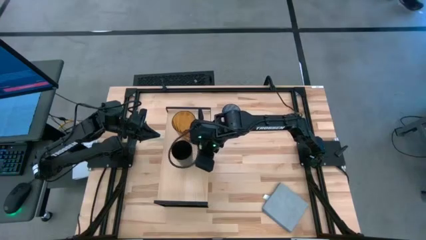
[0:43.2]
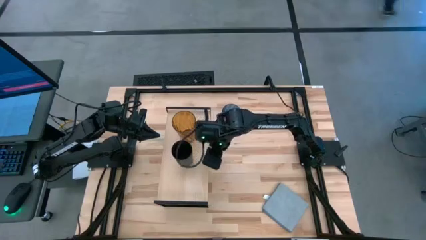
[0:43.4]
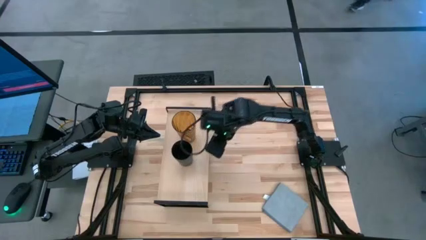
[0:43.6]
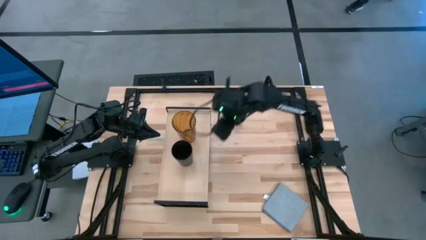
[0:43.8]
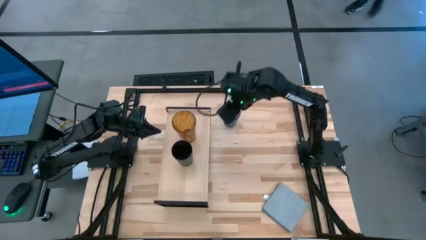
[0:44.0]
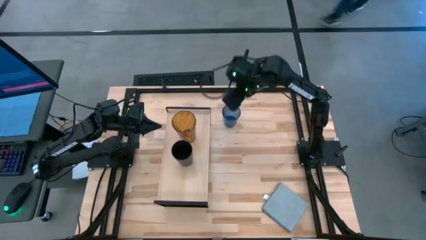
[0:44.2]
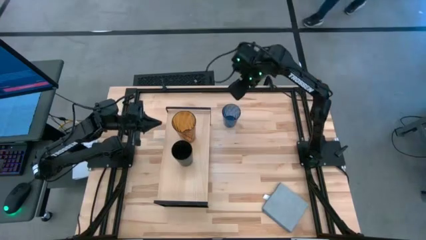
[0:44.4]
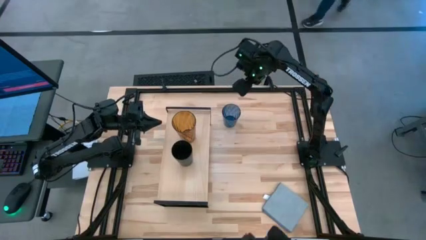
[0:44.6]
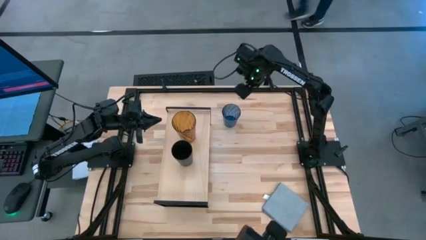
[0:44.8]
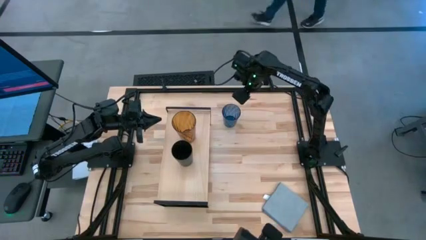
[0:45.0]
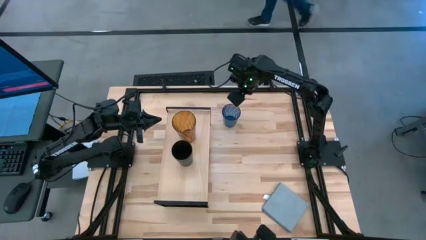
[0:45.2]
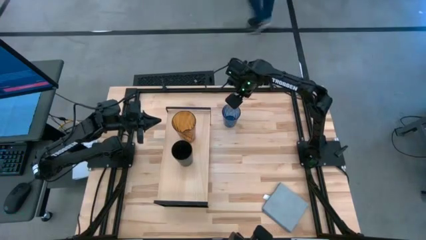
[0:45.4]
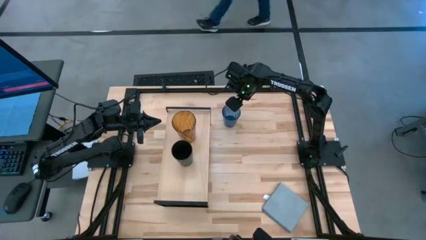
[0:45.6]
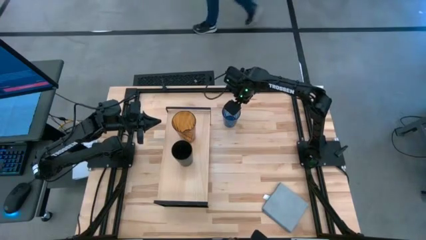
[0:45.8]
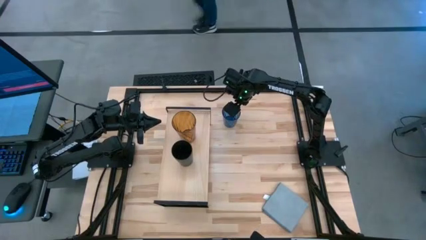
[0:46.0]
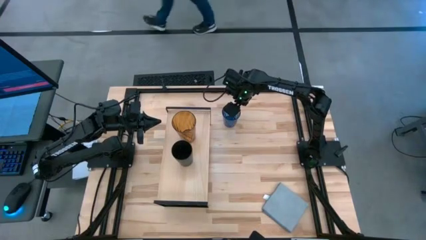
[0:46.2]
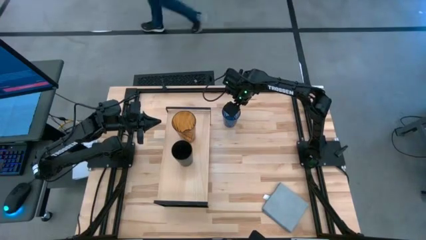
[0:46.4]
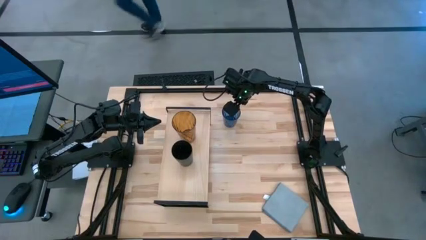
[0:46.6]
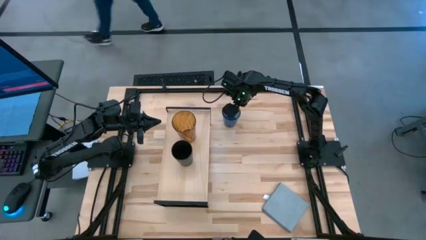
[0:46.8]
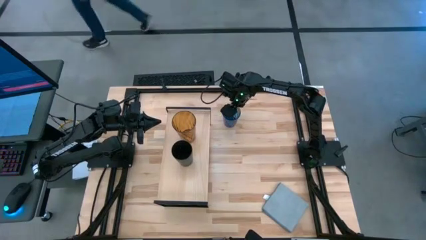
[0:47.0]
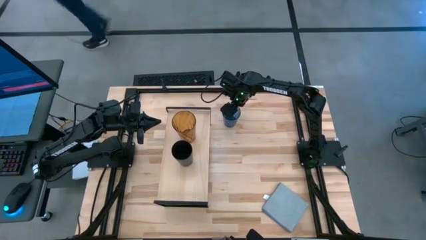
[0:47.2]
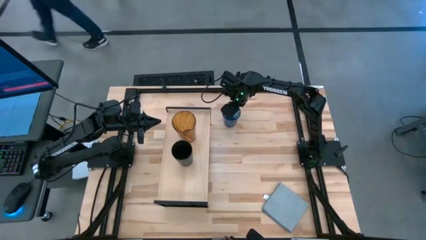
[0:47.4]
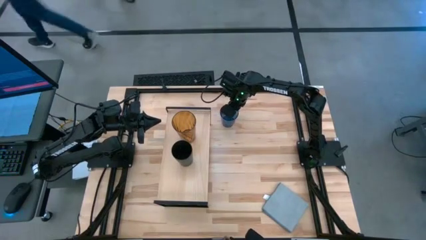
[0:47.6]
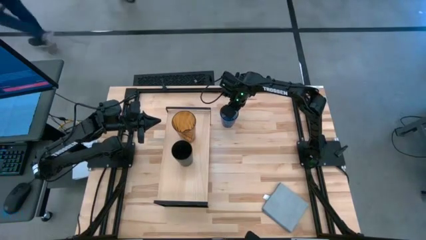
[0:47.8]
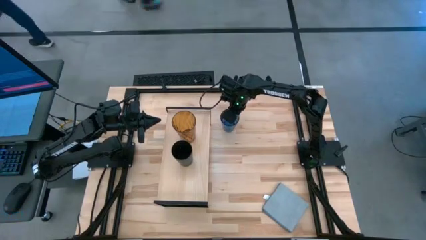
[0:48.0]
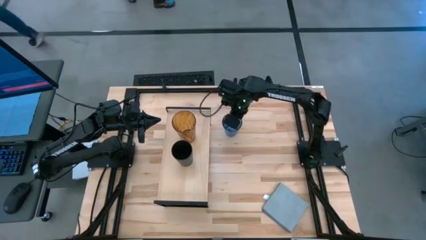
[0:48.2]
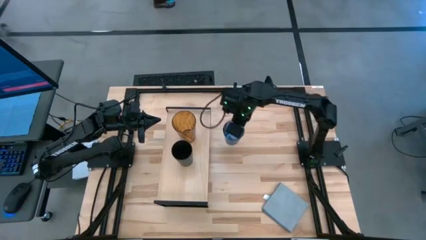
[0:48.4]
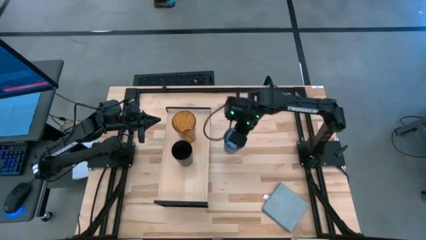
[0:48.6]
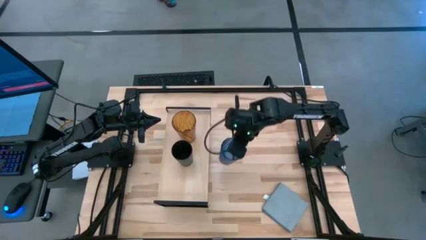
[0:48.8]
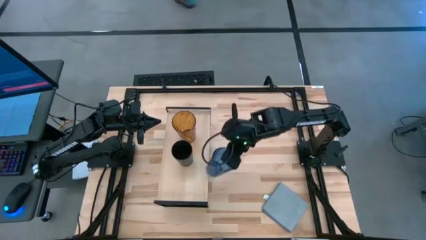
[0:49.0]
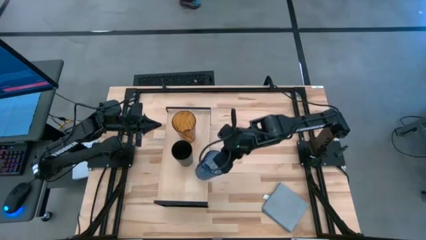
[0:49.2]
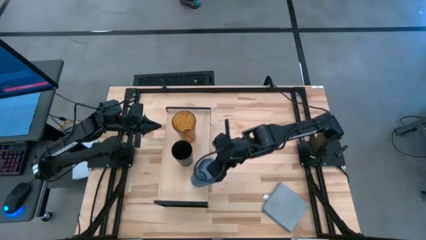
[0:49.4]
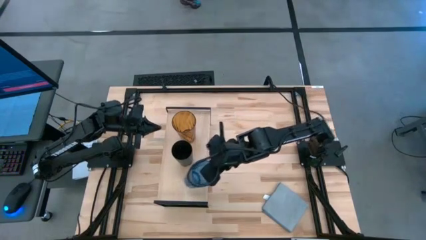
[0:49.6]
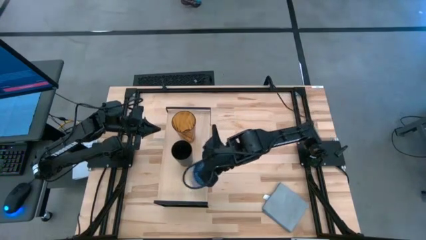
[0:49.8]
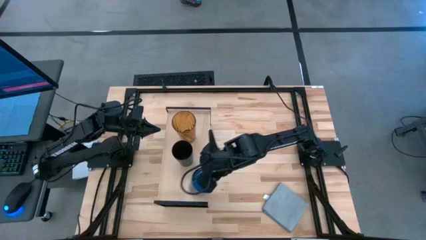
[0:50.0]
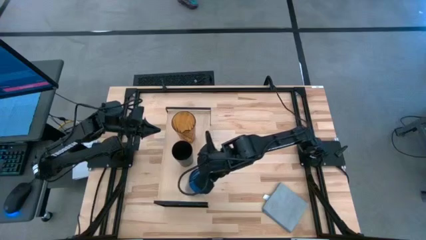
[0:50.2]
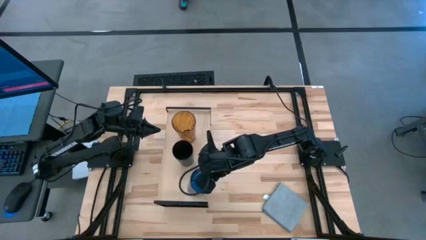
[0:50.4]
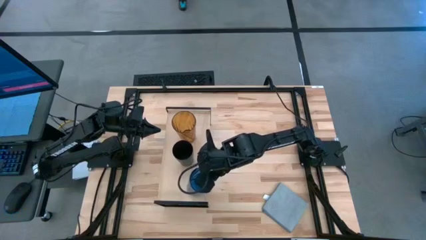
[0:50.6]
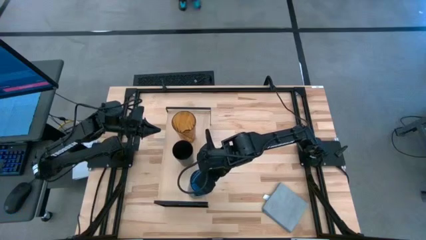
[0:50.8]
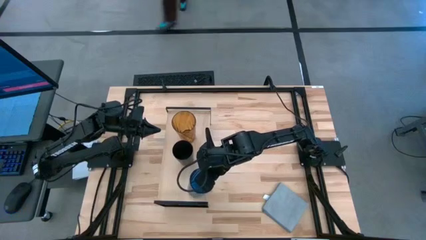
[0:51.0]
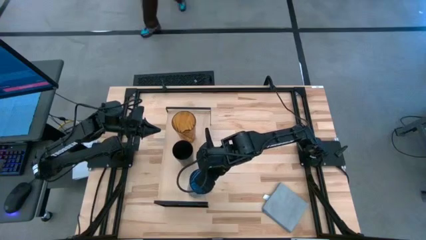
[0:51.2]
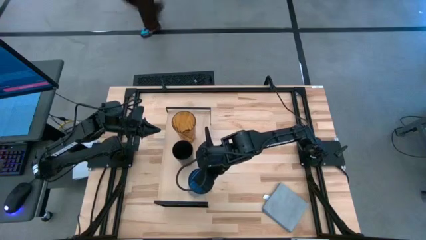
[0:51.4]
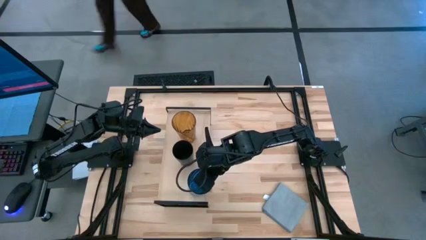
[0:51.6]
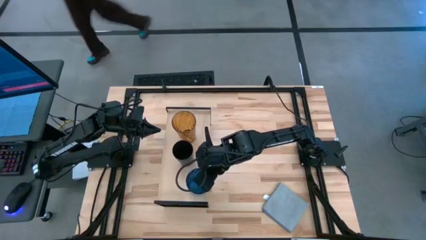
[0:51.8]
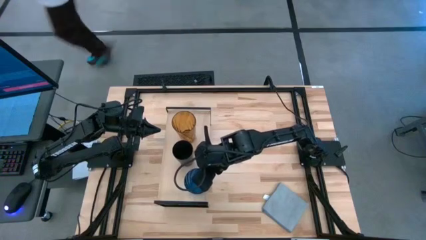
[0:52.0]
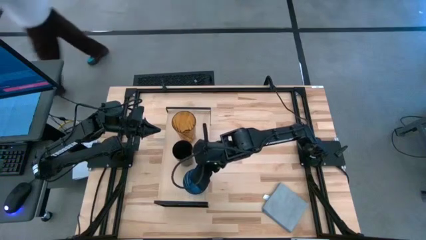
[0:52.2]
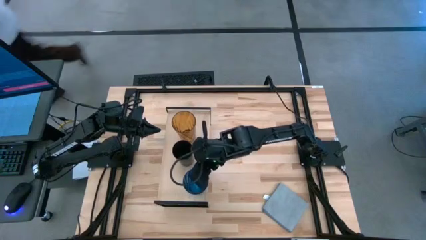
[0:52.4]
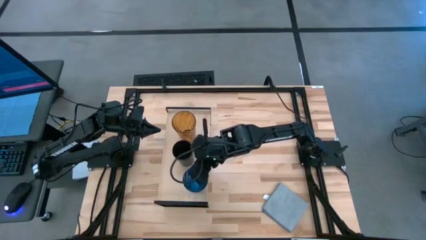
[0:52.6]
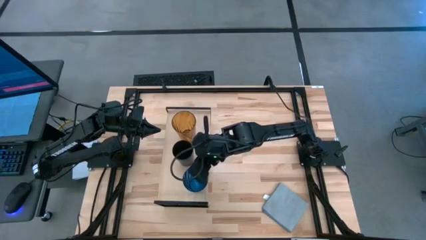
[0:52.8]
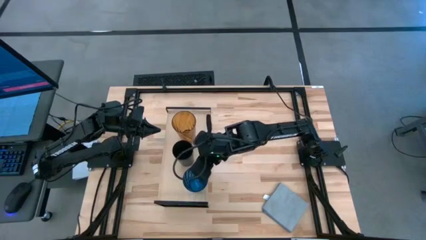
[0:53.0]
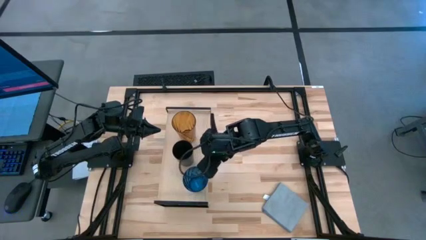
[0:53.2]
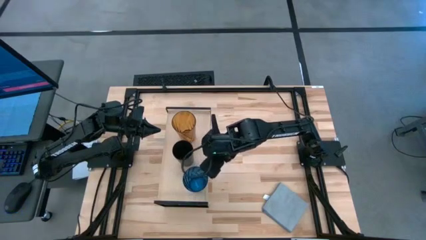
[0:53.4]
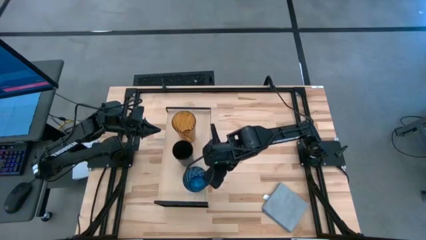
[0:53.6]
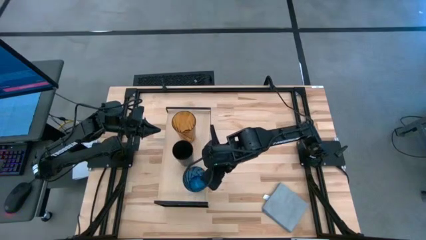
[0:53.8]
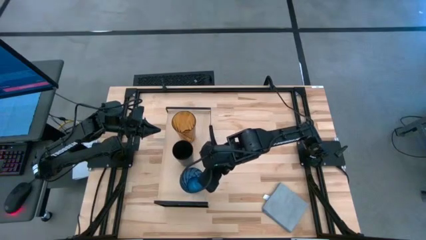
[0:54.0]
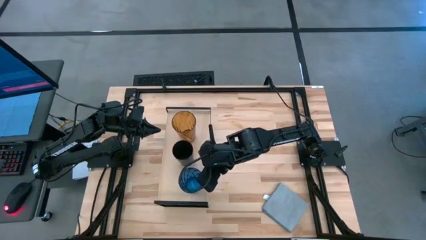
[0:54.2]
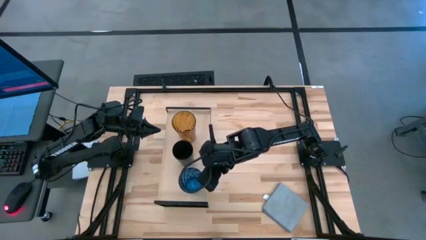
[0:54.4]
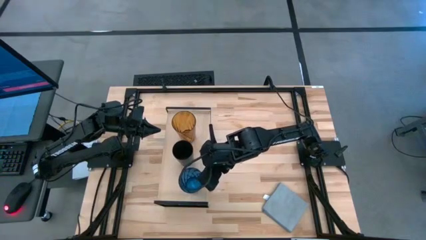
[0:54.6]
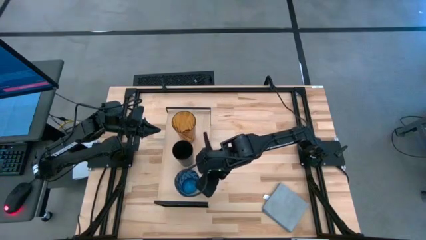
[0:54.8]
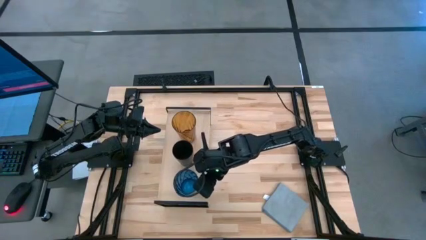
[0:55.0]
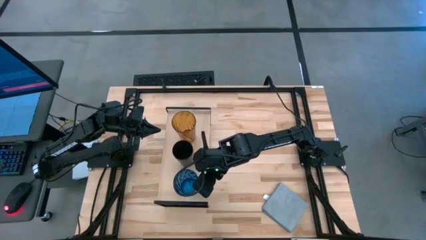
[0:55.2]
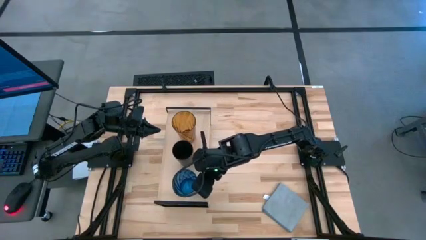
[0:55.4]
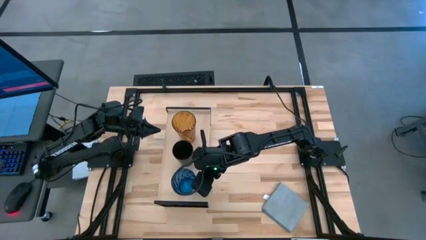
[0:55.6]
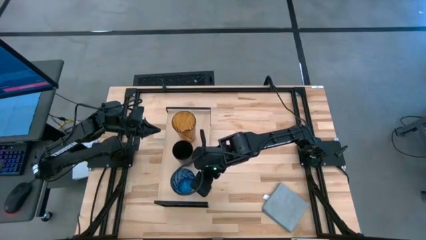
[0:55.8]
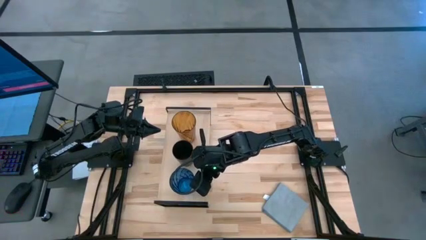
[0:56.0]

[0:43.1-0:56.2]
Task: Stack small to large cups/mugs on shelf
Put the blue cup on the shelf
